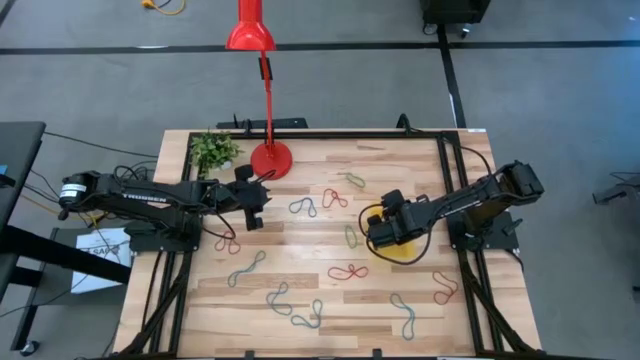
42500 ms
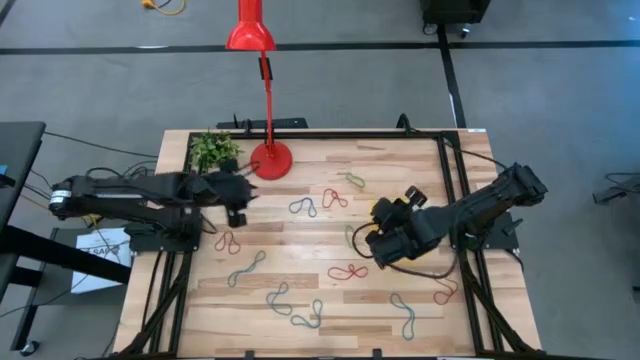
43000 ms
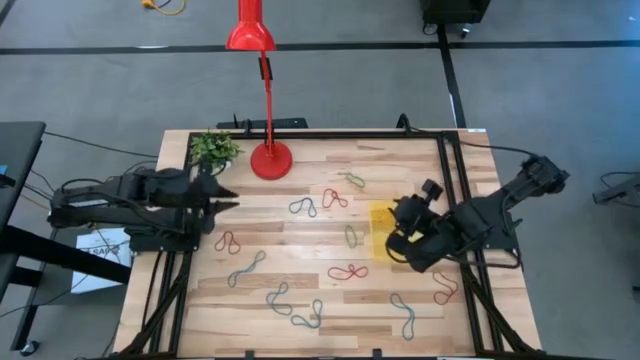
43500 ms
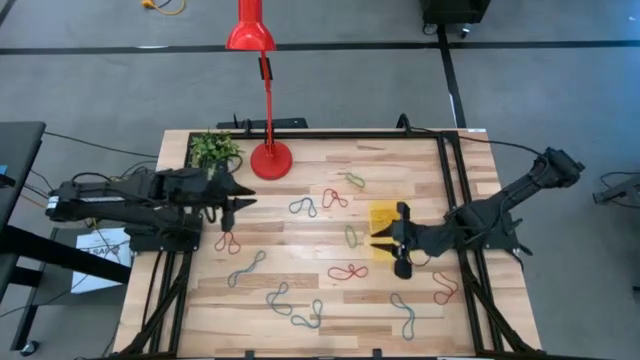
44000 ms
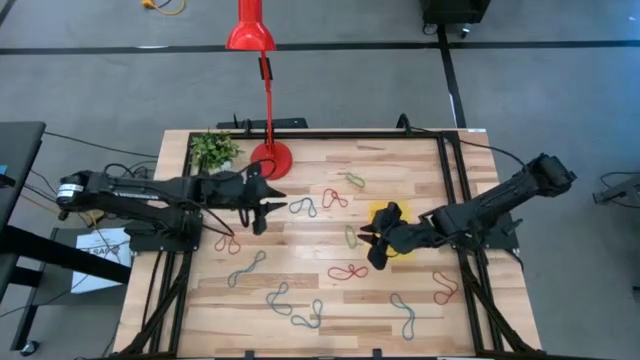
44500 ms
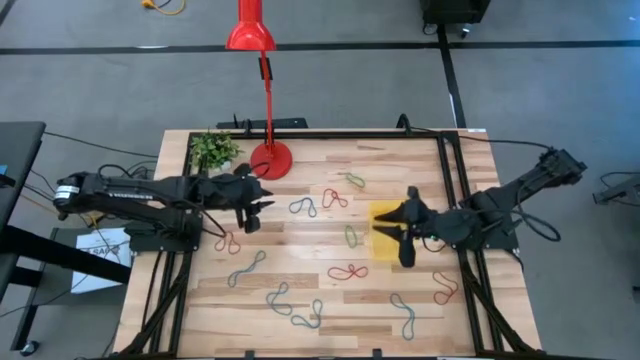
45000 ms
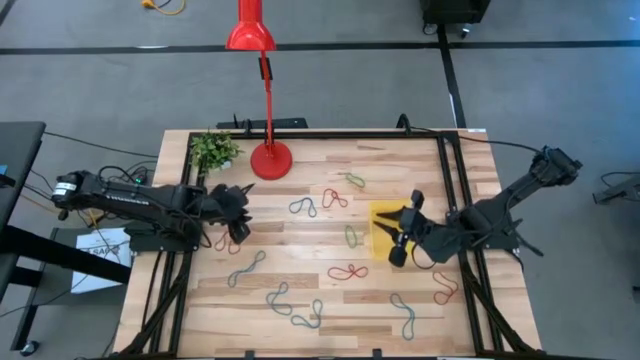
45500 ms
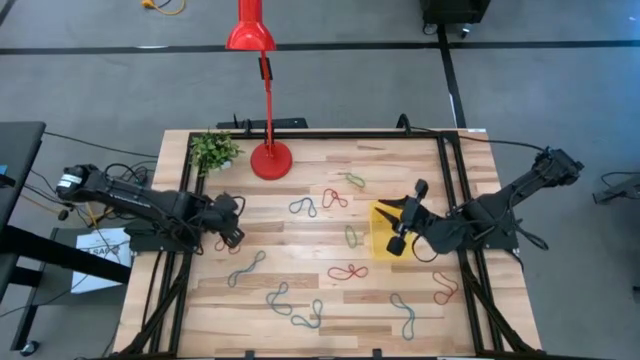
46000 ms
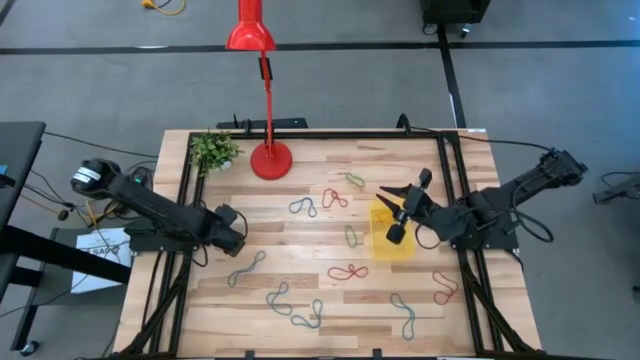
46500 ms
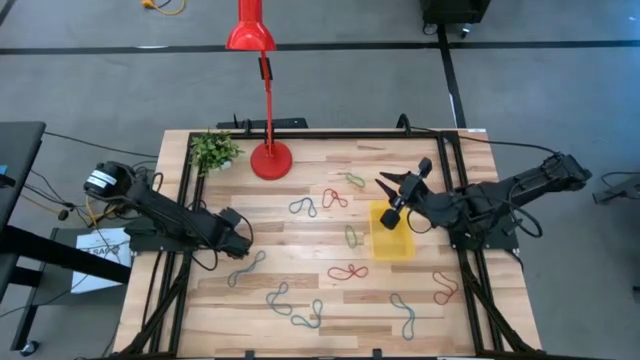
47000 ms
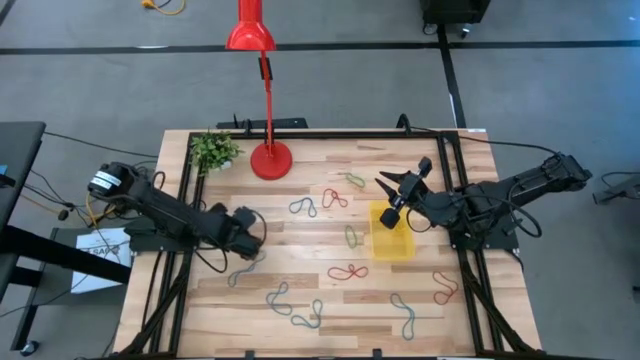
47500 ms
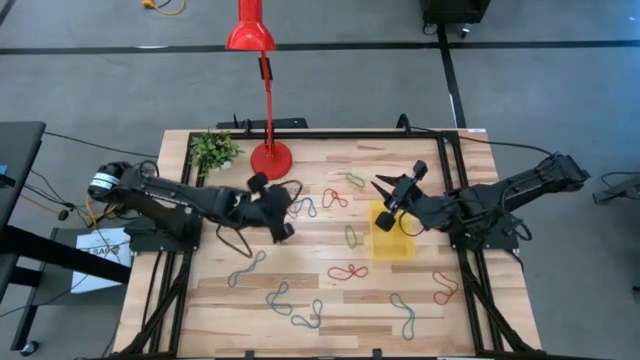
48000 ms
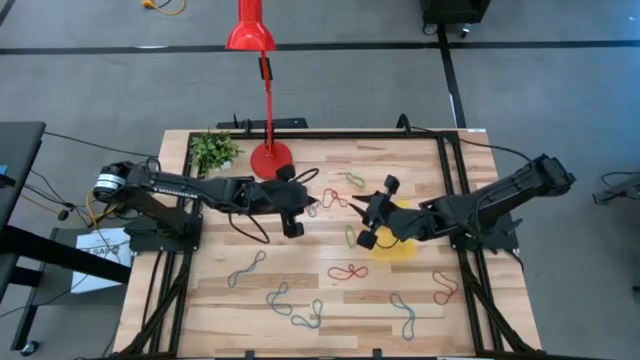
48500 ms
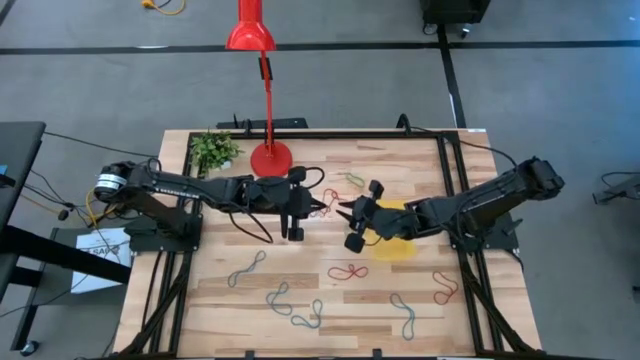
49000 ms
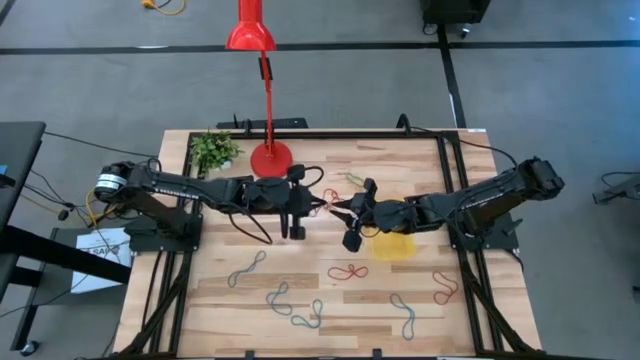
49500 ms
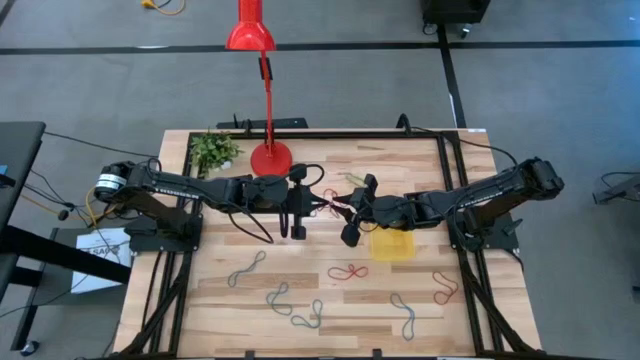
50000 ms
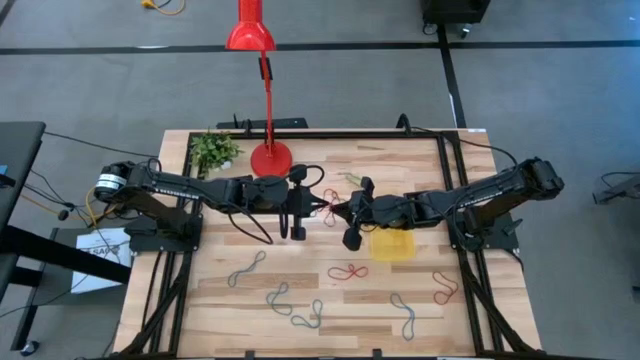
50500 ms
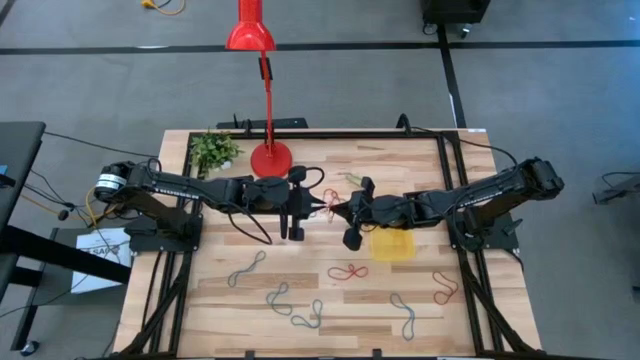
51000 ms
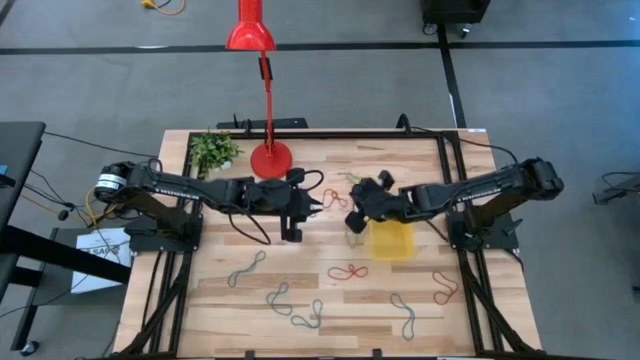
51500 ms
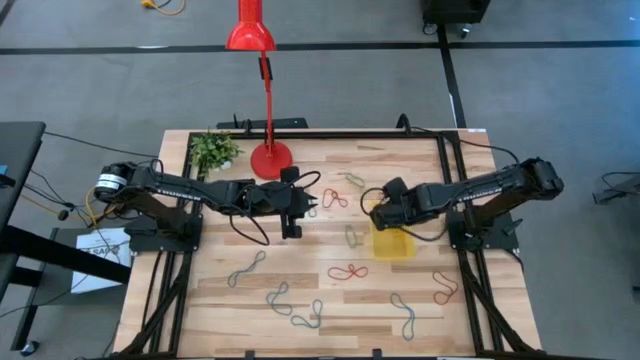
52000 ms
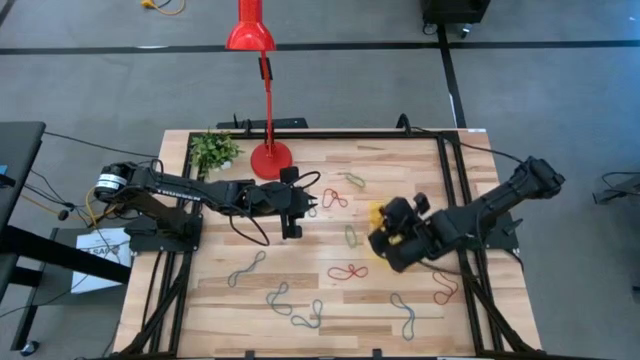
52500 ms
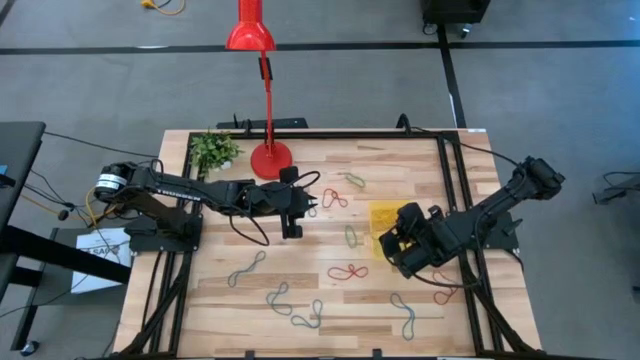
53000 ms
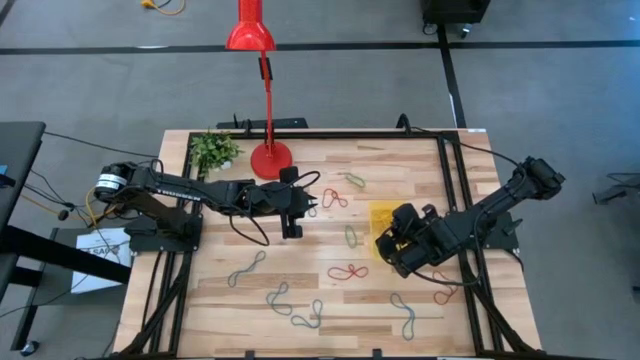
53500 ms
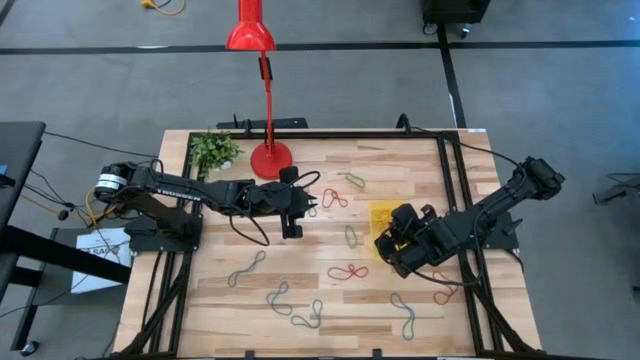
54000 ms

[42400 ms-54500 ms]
Task: Pick and place items into bin
Put the red rubber band into the yellow bin

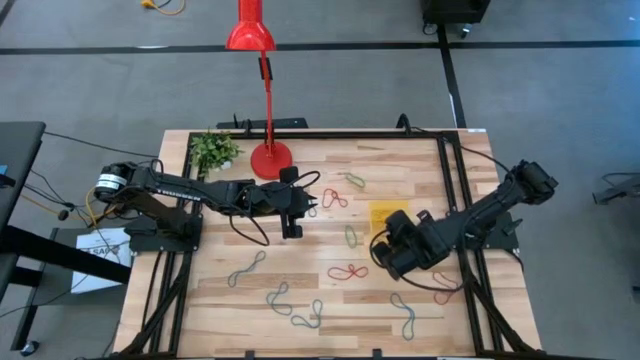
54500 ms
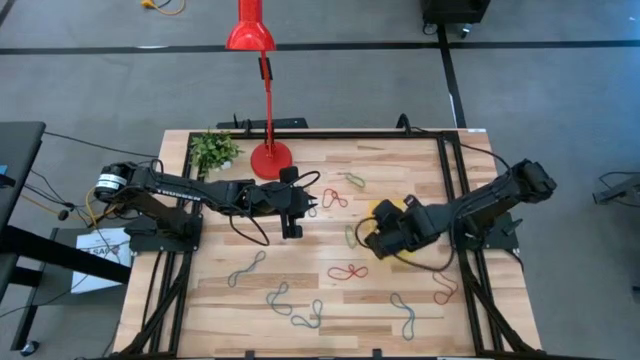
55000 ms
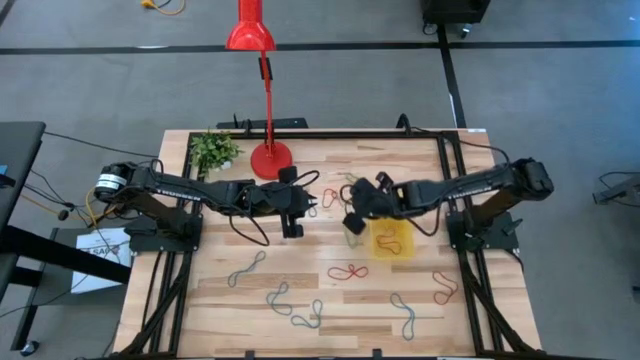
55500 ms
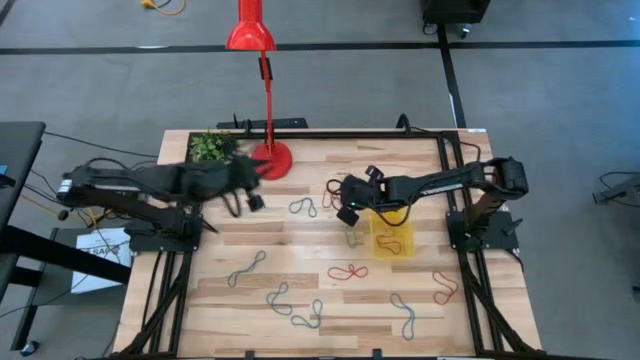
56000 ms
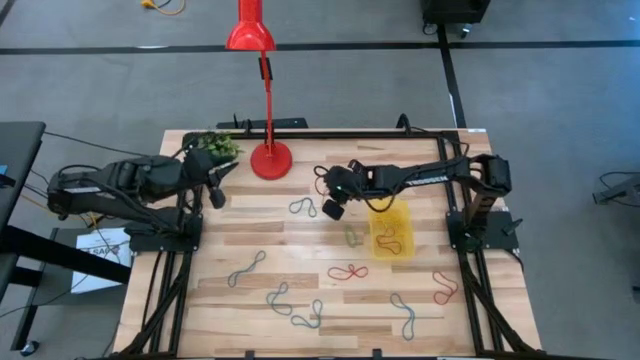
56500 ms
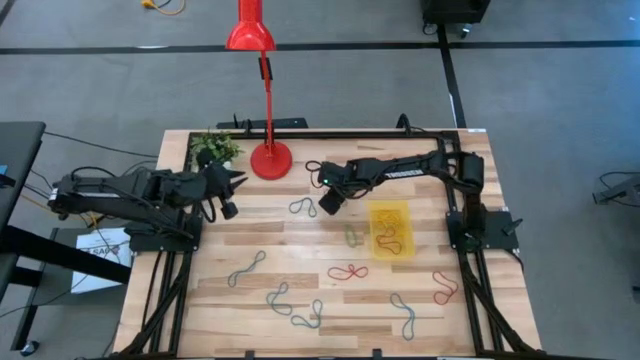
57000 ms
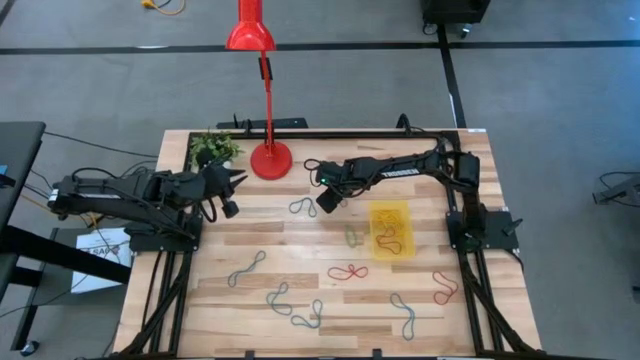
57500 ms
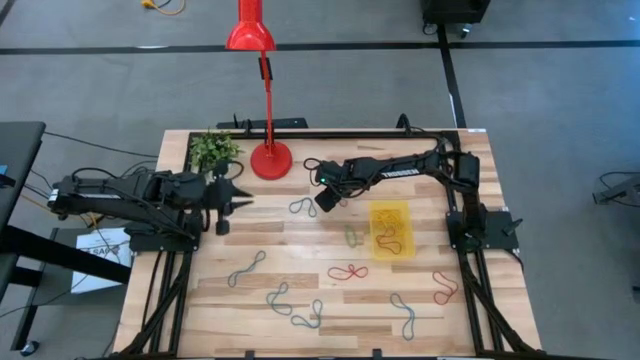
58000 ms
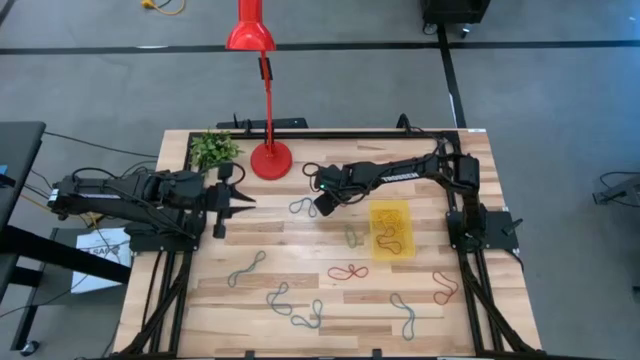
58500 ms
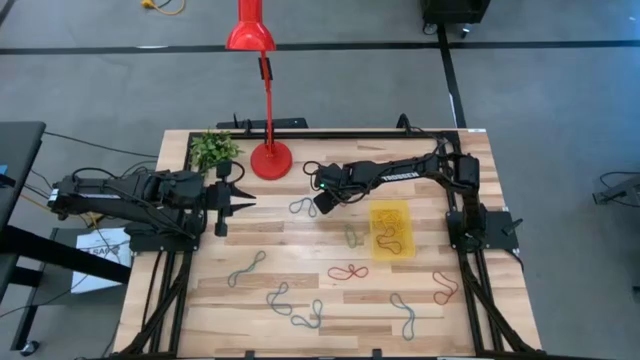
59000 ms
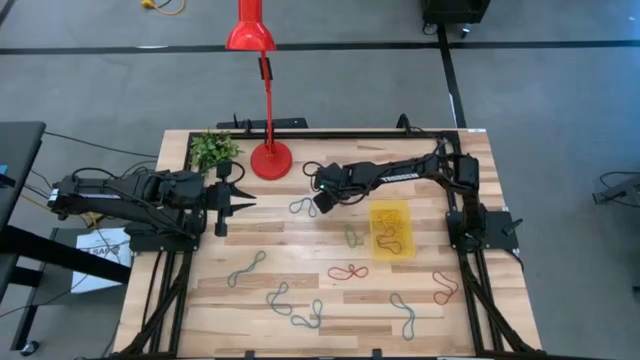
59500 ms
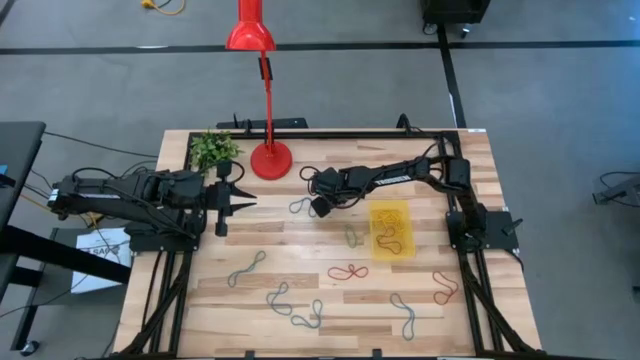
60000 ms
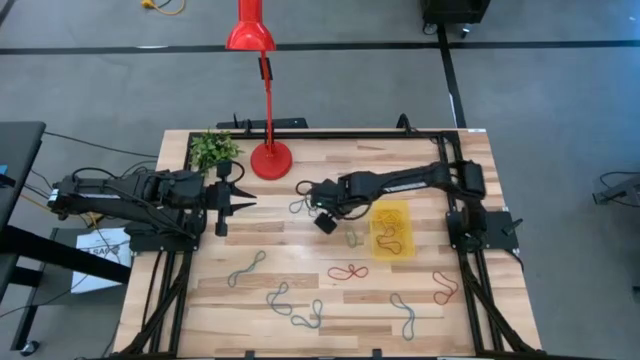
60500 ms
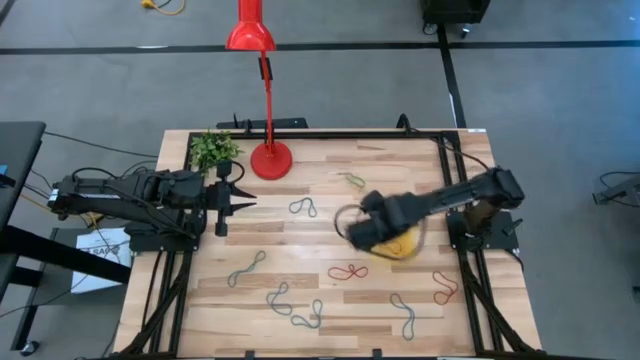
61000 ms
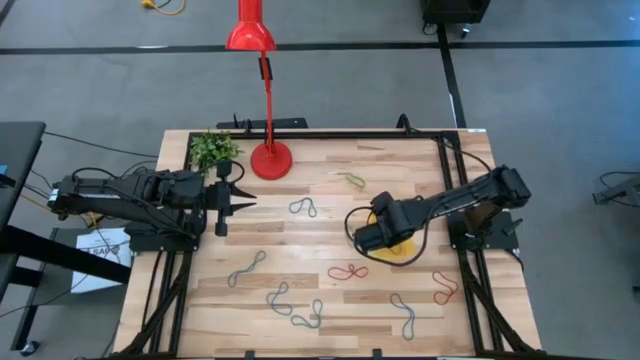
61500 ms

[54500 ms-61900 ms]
Put the red rubber band into the yellow bin

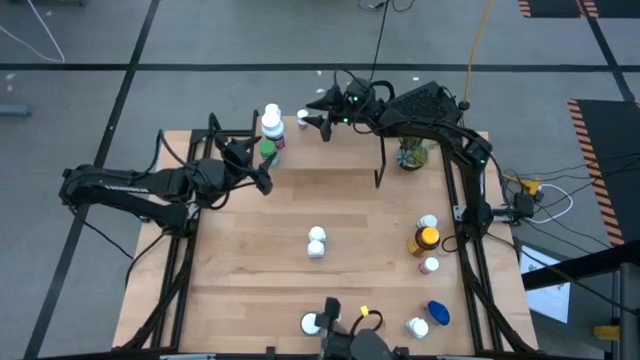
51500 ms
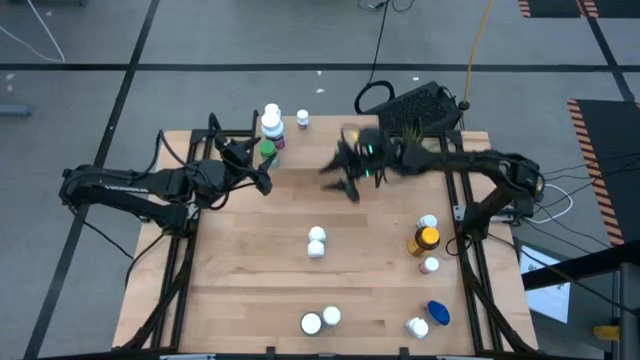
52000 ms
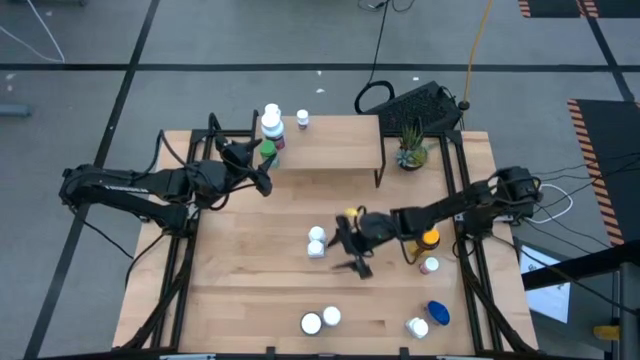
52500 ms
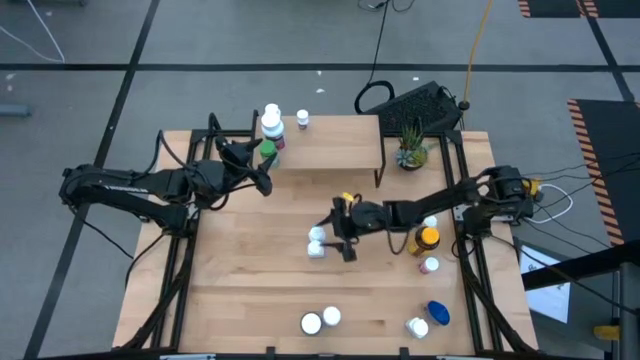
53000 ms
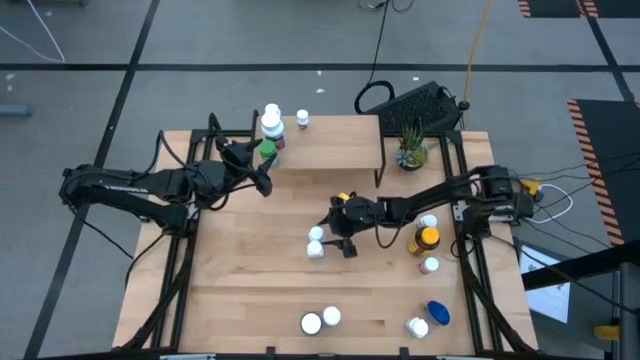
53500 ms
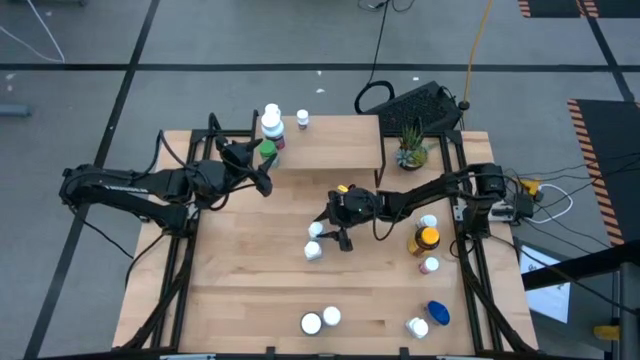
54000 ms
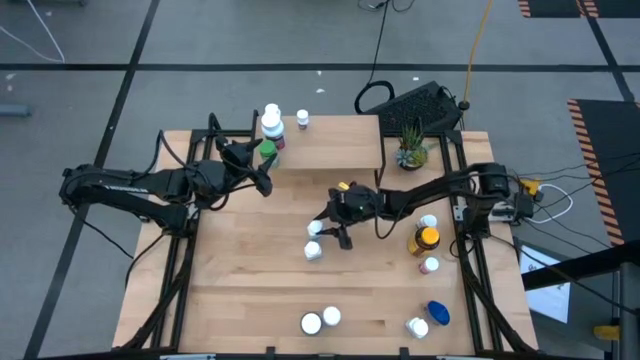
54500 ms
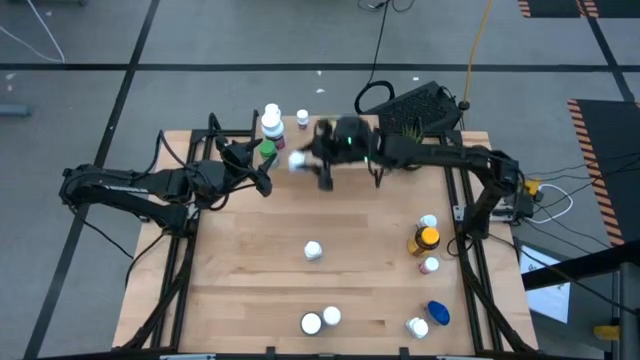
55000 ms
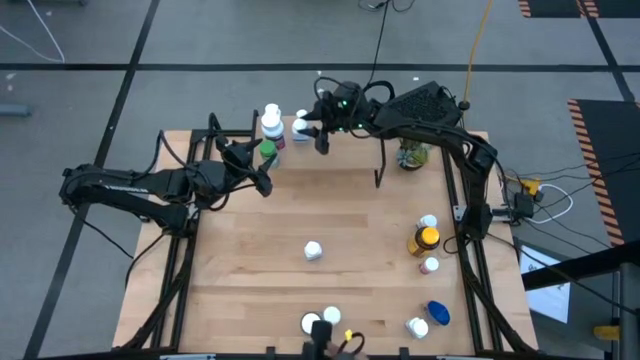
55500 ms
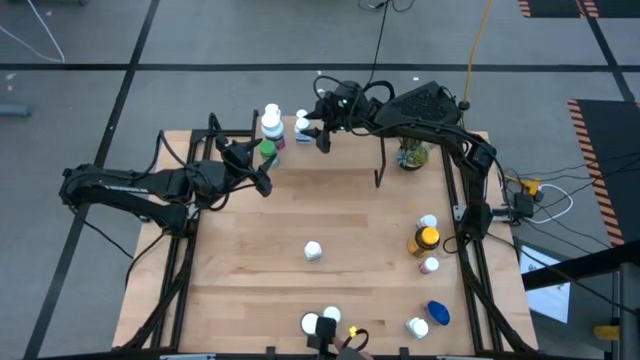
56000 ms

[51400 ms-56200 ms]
Task: Pick and place medicine bottles onto shelf by color
Put the white pill bottle on the shelf
